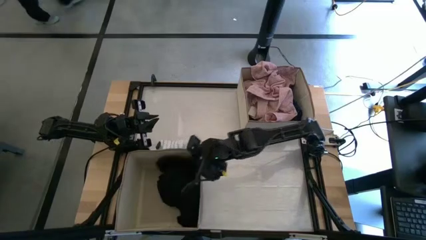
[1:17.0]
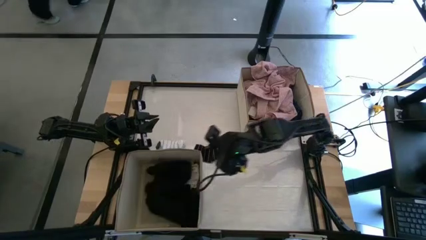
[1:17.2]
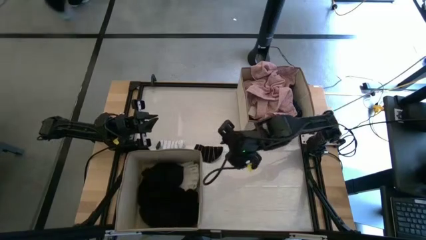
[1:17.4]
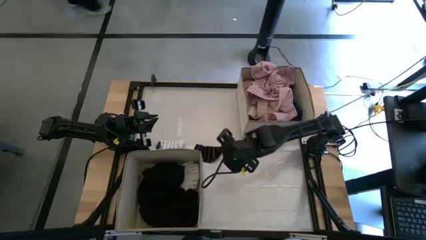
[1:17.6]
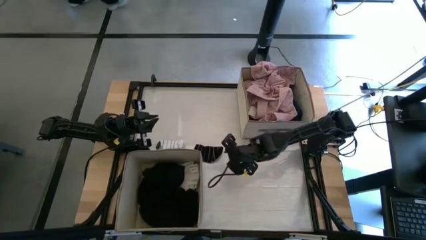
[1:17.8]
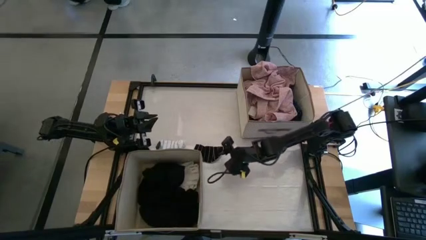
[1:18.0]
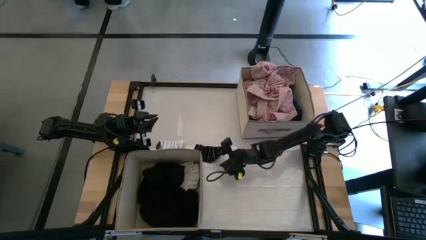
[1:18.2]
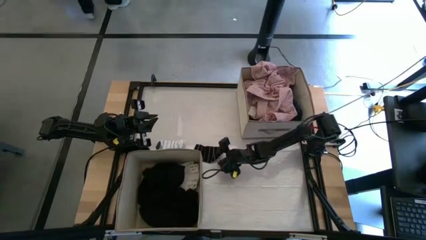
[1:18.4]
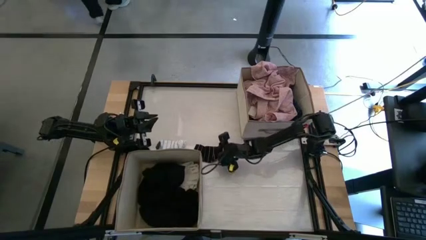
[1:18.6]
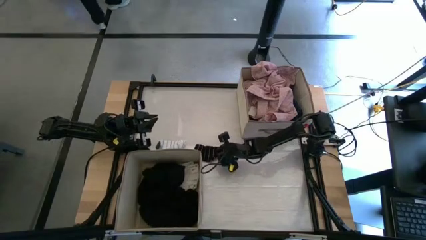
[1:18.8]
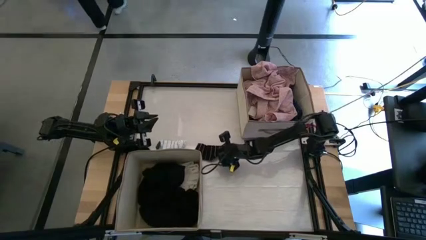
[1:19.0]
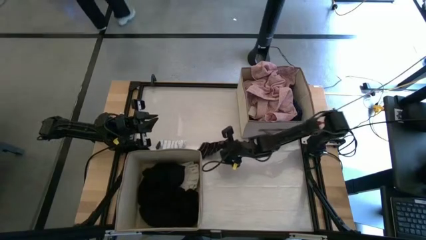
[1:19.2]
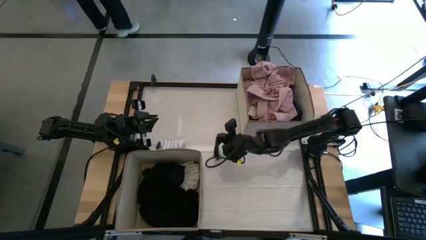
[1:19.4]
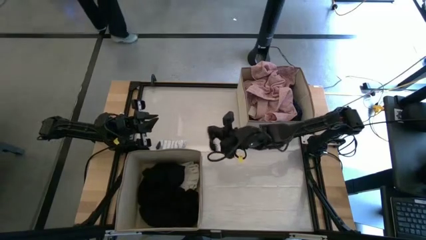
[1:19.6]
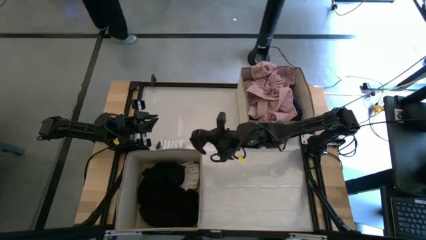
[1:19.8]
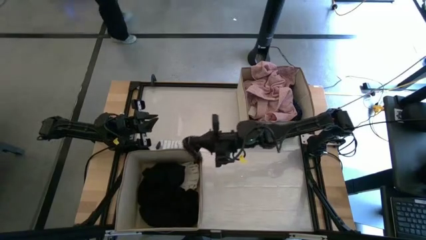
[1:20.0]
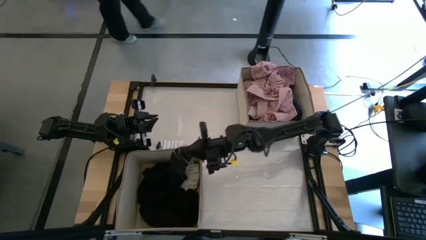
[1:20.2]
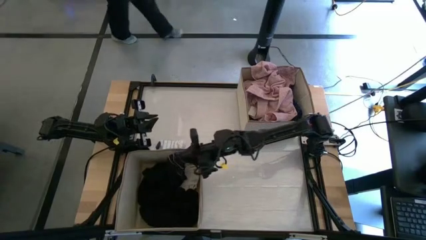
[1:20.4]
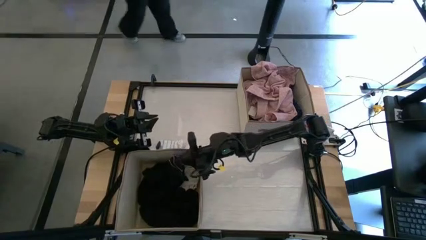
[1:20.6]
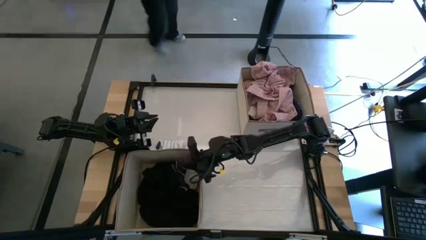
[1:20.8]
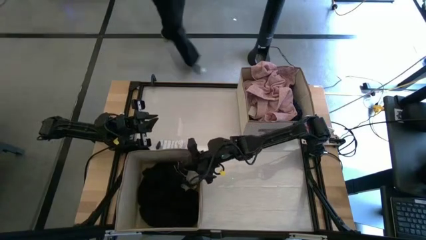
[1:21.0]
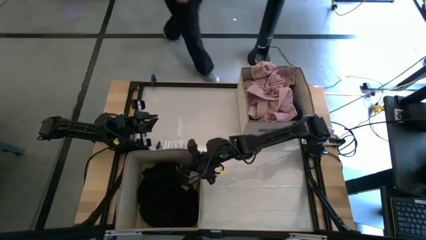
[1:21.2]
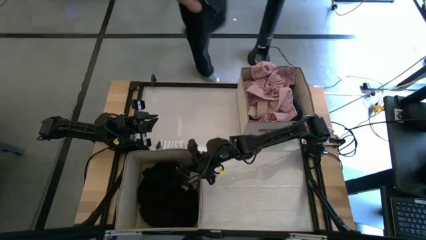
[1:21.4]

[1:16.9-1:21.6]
Task: Sort clothes
Put the black striped sock into the left laundry organizer

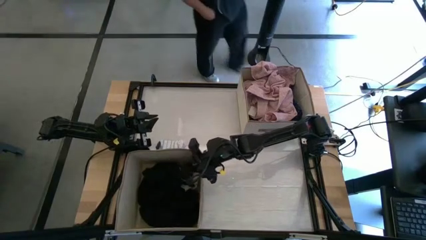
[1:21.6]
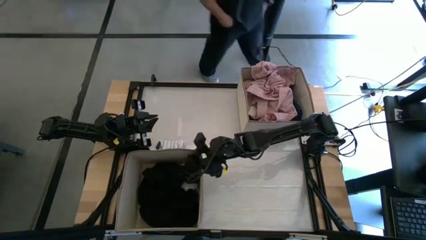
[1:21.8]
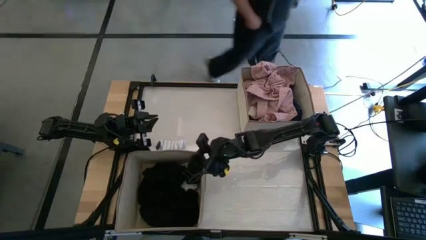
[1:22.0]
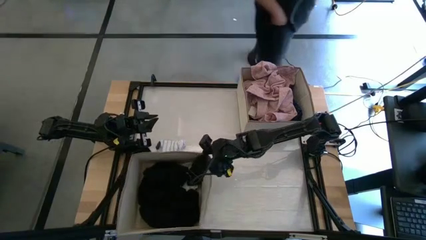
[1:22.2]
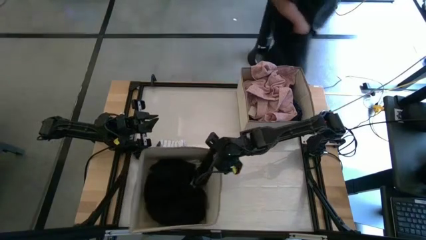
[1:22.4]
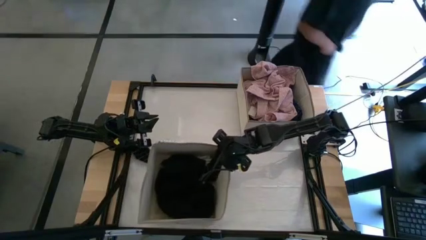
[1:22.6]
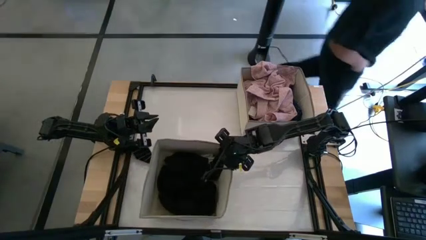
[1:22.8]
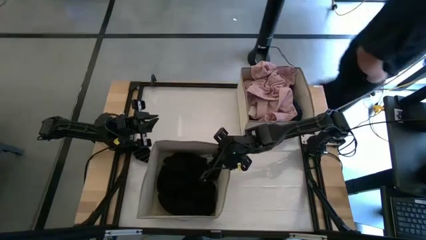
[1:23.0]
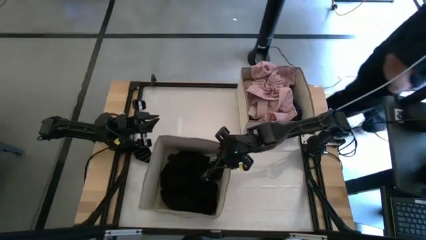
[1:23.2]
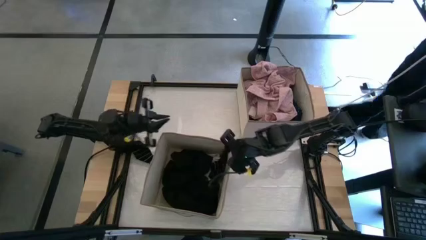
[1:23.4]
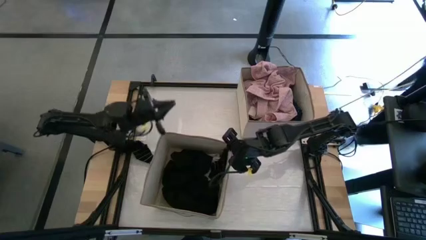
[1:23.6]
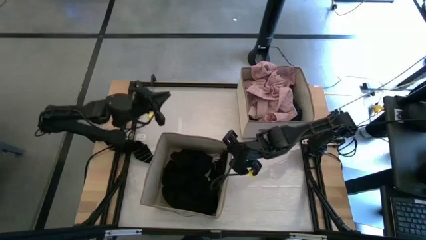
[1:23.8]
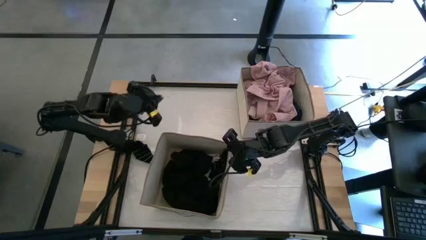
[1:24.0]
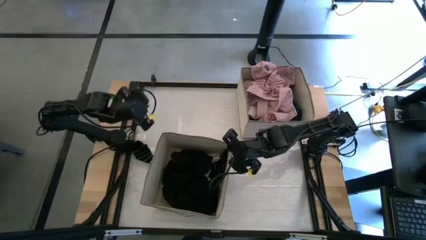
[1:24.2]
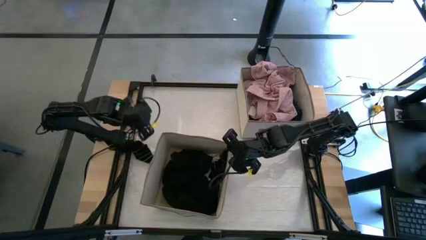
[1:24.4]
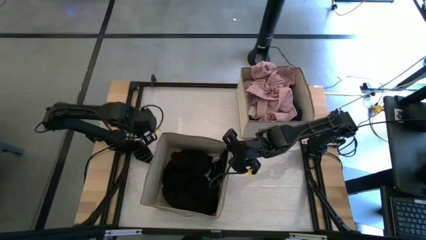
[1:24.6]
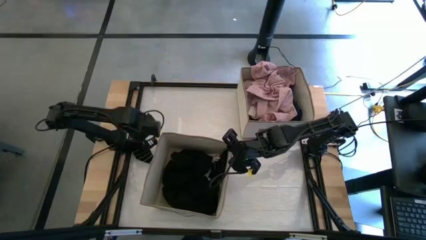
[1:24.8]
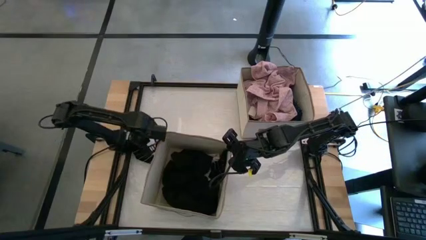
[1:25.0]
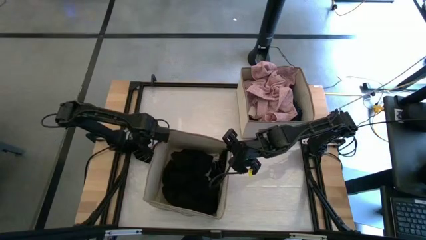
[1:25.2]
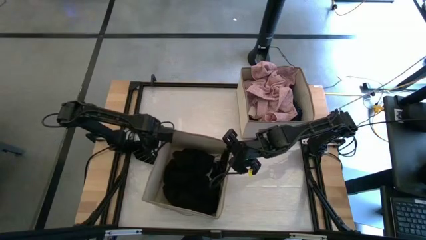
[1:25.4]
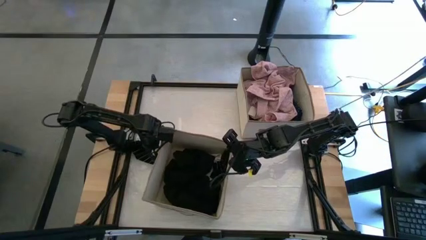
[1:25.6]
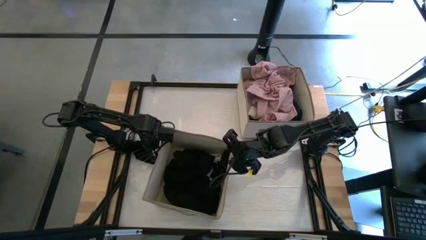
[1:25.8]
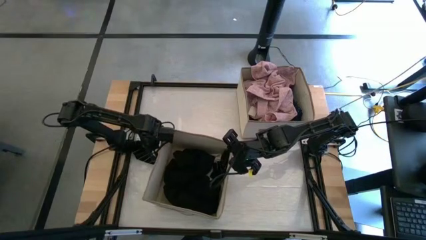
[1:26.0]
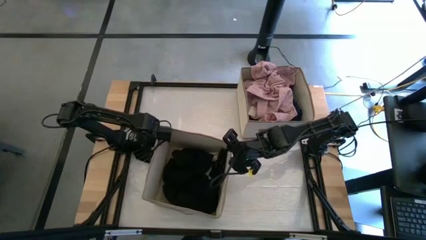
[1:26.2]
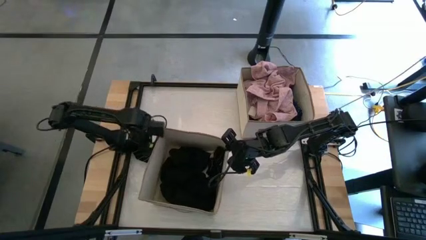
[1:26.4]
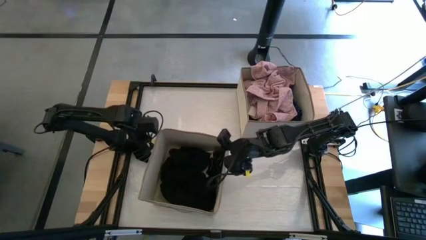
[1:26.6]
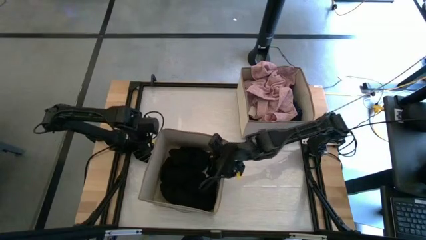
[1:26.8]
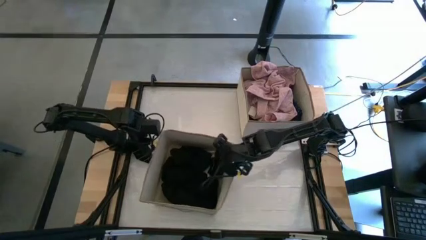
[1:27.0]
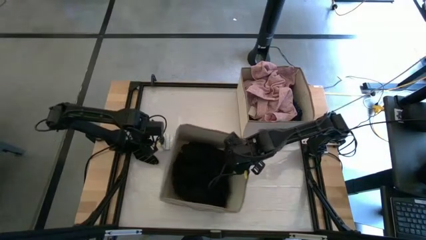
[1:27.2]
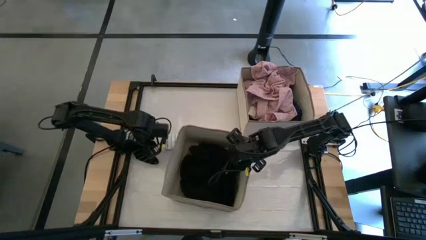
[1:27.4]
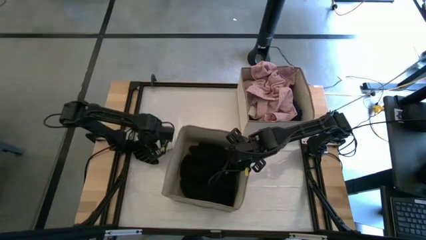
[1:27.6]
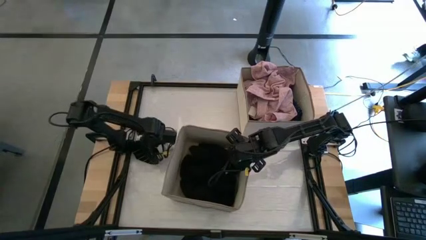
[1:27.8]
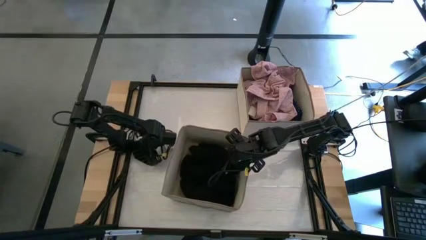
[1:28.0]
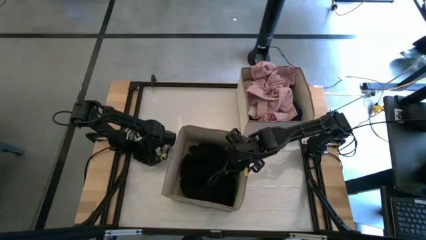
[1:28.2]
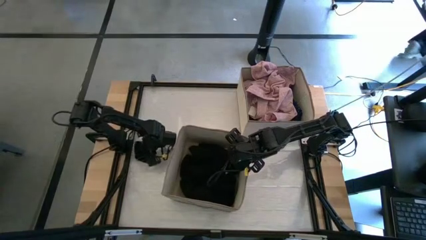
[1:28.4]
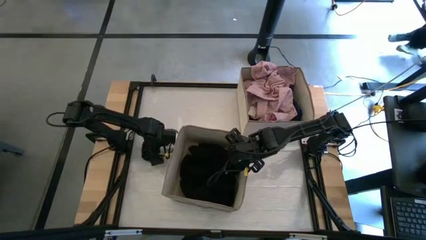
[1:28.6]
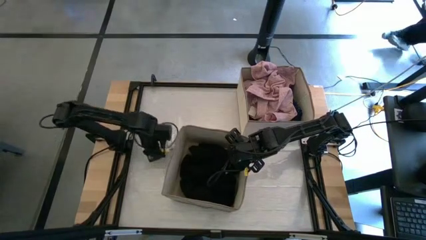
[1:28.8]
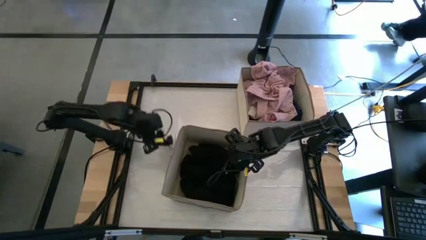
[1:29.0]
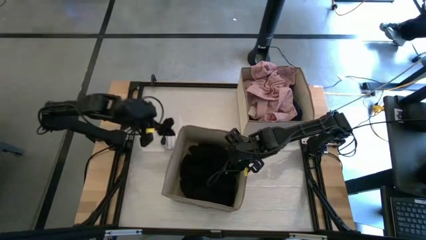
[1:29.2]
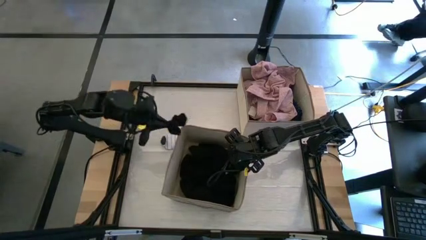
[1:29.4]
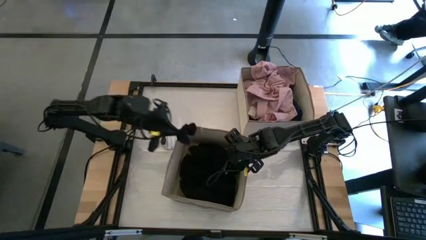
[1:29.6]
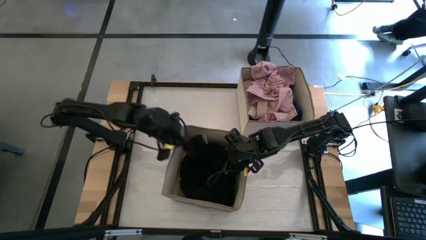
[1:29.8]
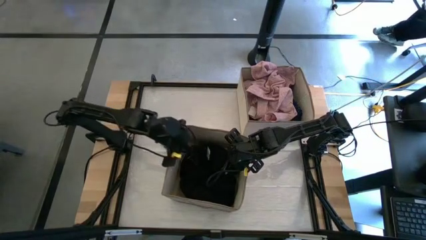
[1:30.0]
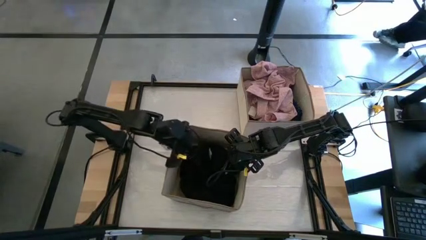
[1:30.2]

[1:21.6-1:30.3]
Put the black striped sock into the left laundry organizer

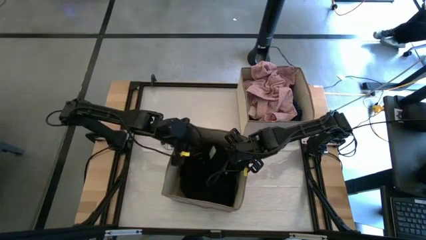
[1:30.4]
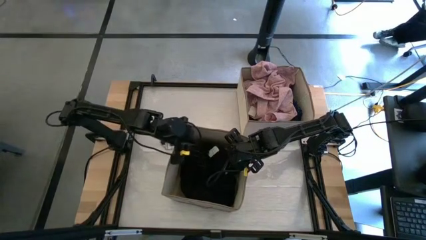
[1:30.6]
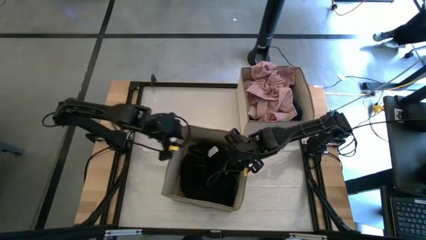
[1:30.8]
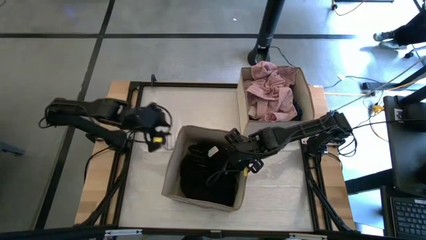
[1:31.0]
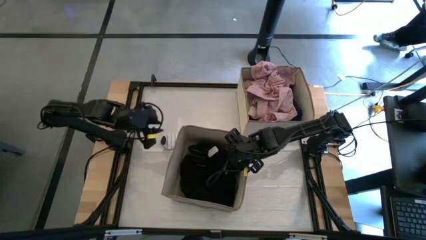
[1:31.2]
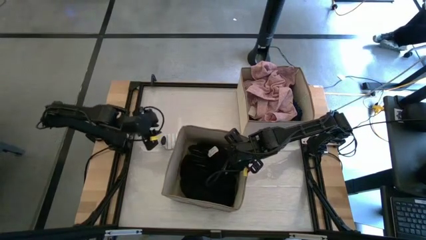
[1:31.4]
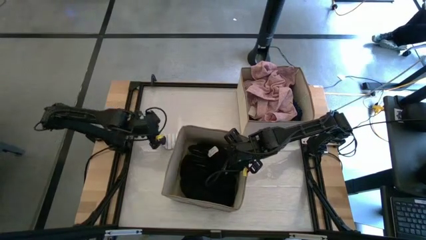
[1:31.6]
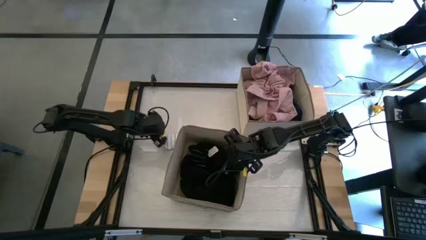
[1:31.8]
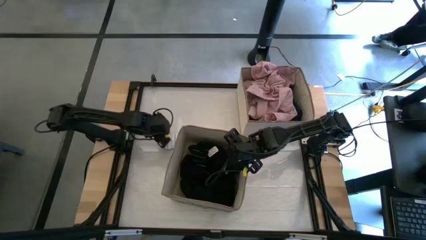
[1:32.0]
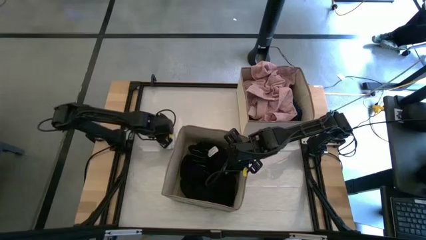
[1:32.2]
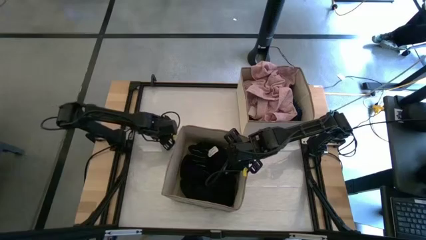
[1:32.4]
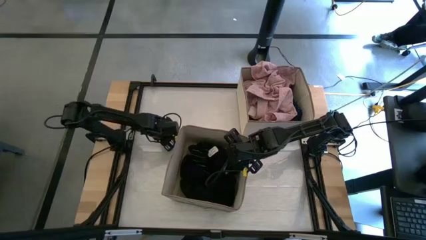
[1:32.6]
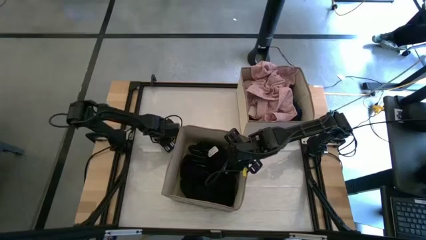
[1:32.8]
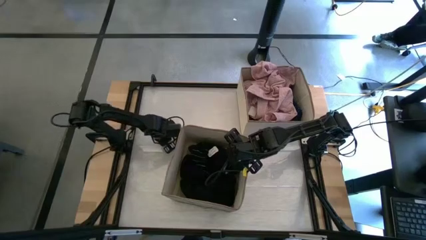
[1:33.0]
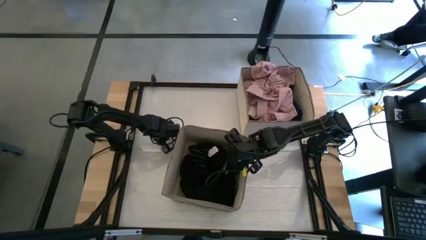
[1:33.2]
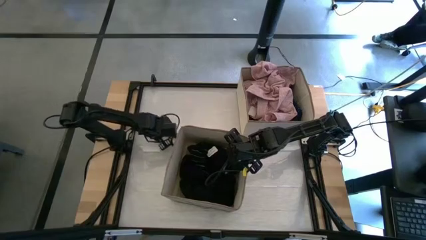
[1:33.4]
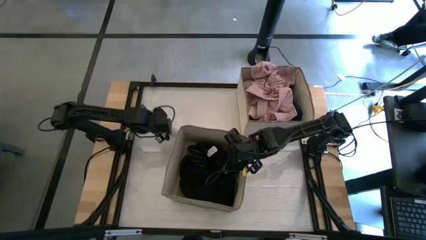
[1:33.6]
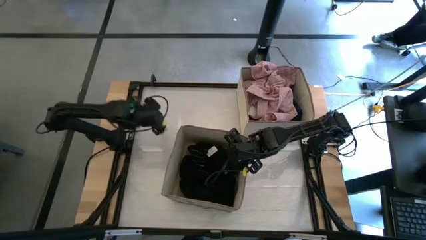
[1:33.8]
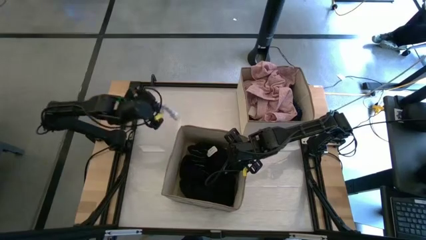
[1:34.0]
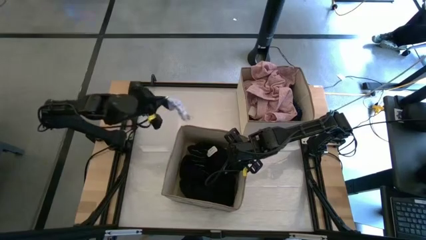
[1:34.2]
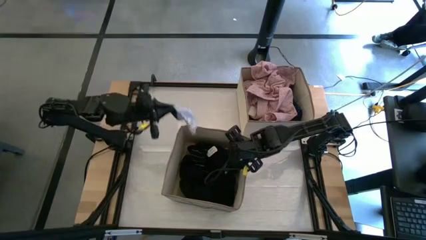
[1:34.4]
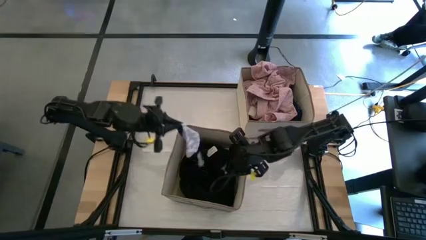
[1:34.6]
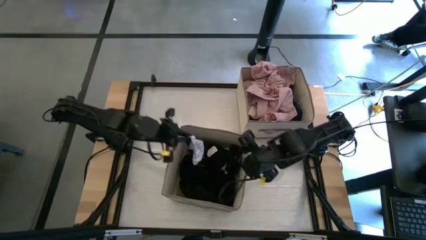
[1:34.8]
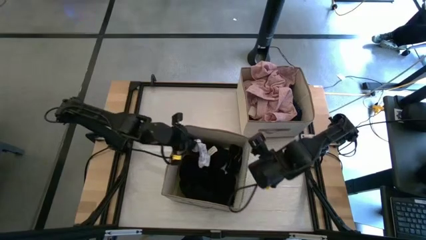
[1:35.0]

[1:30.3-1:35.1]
Put the white striped sock into the left laundry organizer
